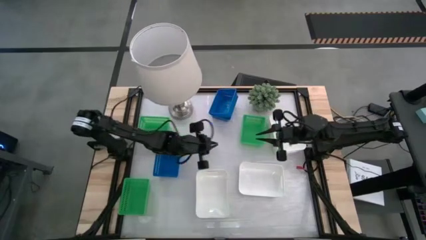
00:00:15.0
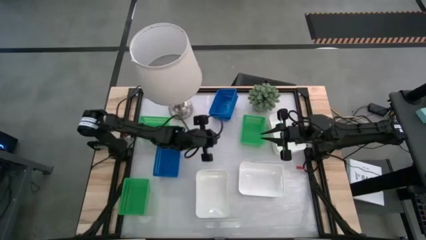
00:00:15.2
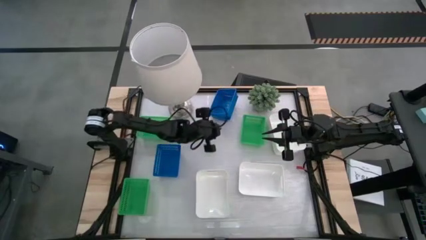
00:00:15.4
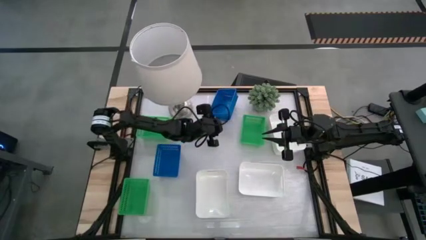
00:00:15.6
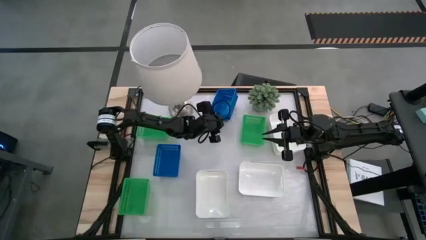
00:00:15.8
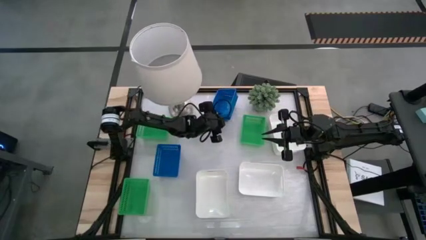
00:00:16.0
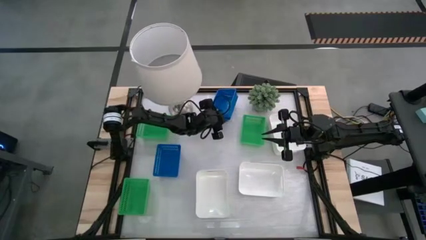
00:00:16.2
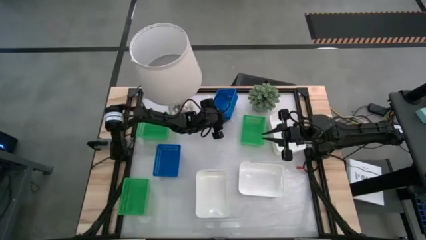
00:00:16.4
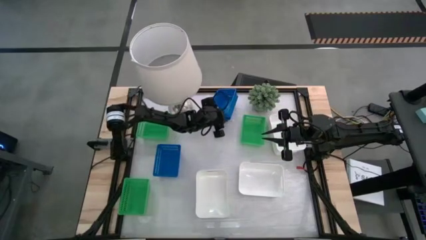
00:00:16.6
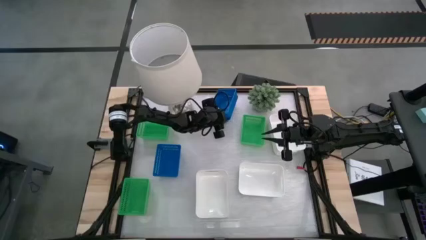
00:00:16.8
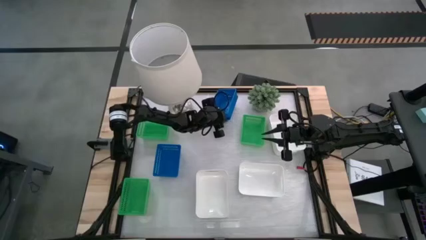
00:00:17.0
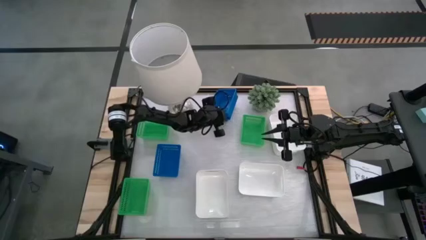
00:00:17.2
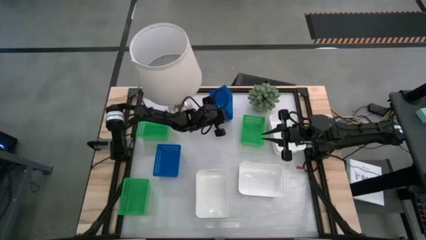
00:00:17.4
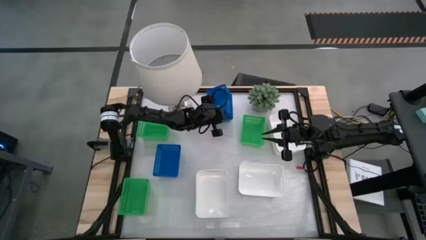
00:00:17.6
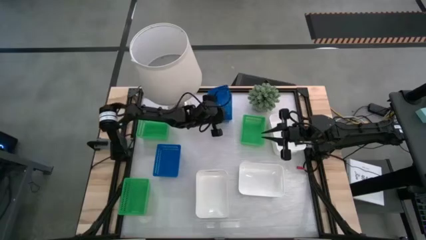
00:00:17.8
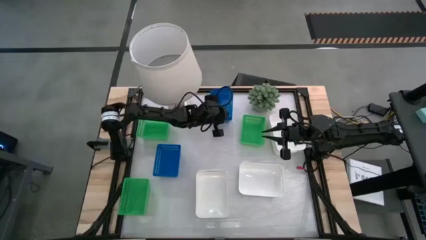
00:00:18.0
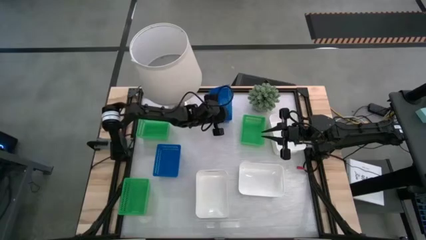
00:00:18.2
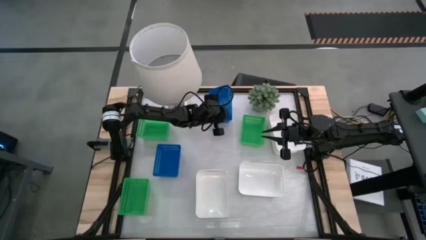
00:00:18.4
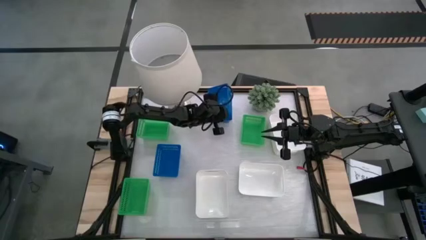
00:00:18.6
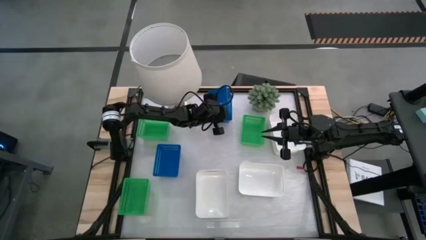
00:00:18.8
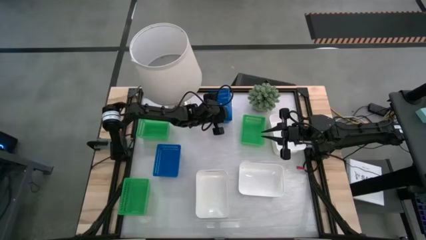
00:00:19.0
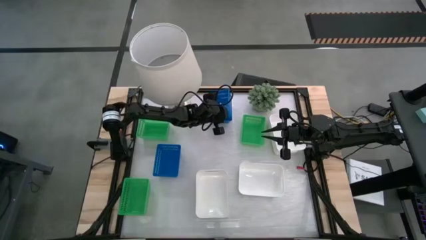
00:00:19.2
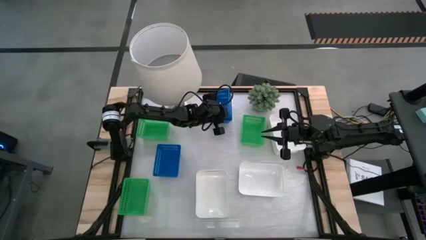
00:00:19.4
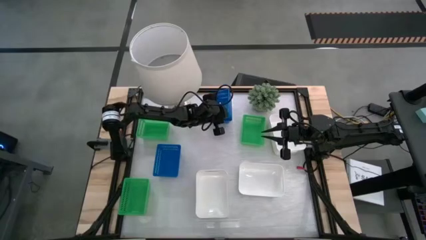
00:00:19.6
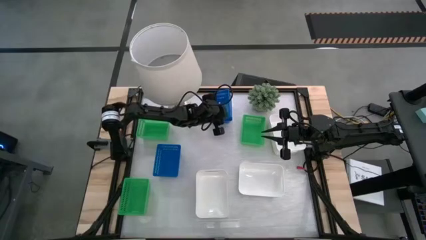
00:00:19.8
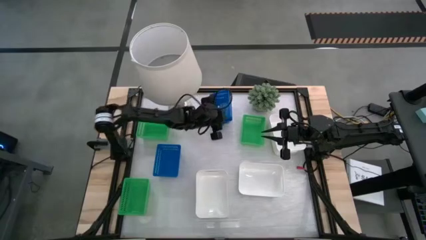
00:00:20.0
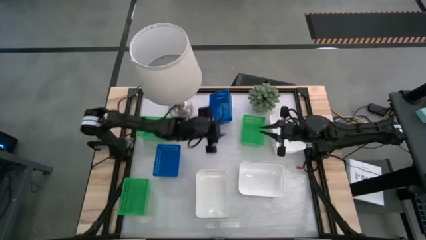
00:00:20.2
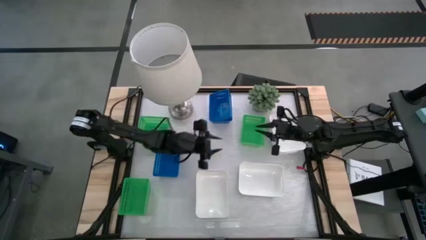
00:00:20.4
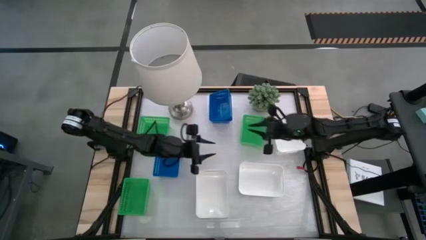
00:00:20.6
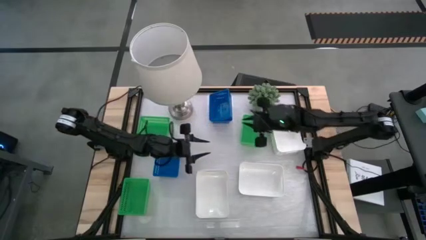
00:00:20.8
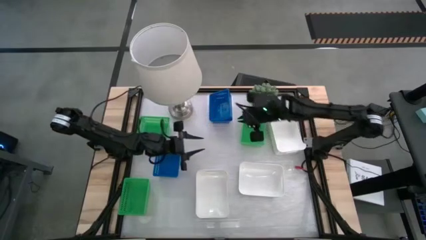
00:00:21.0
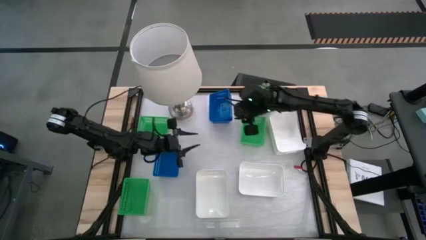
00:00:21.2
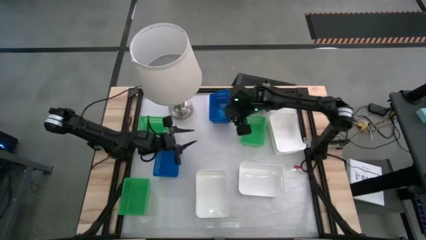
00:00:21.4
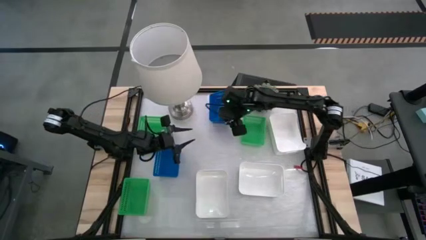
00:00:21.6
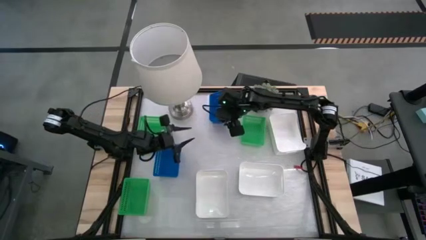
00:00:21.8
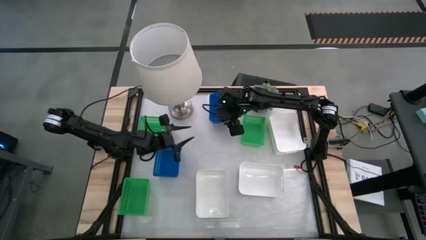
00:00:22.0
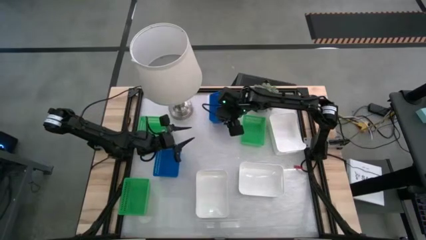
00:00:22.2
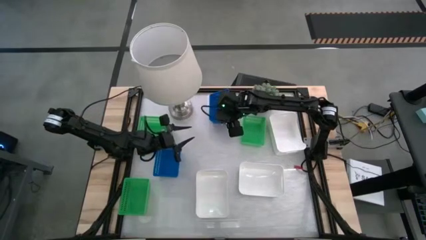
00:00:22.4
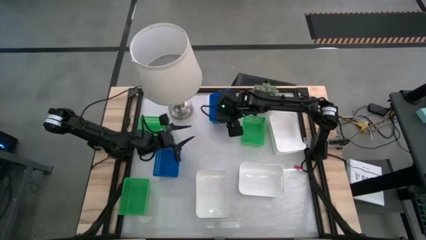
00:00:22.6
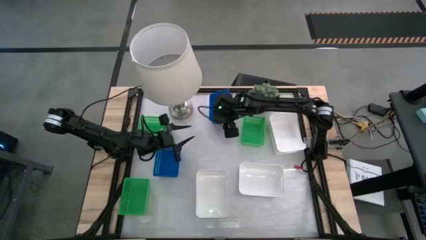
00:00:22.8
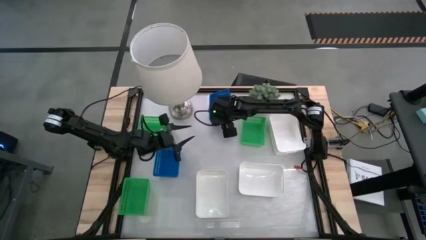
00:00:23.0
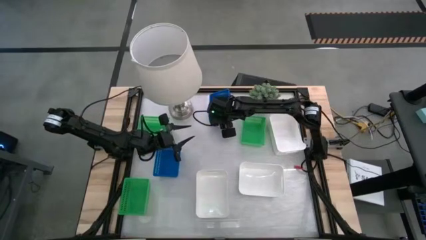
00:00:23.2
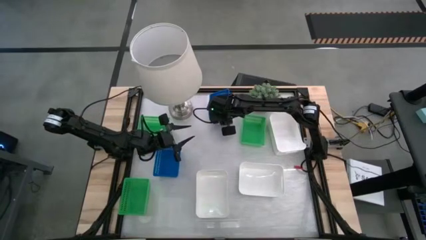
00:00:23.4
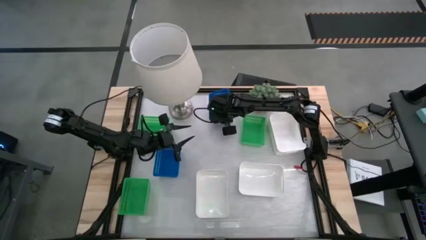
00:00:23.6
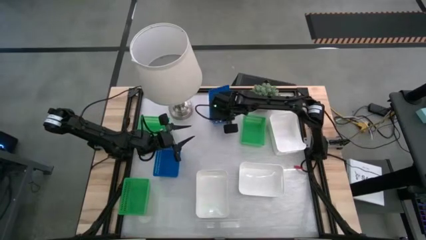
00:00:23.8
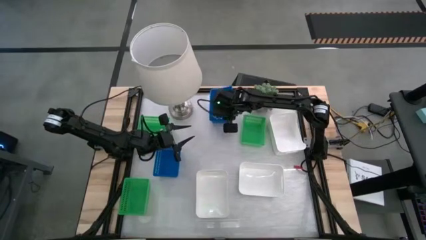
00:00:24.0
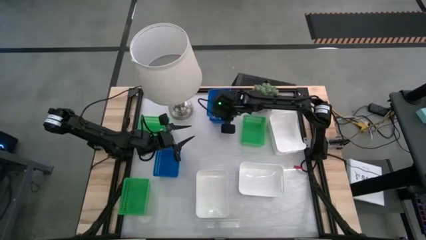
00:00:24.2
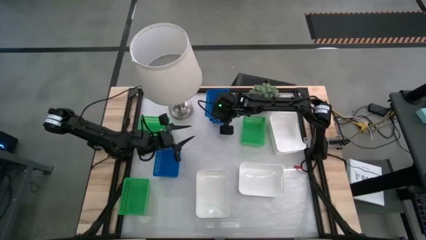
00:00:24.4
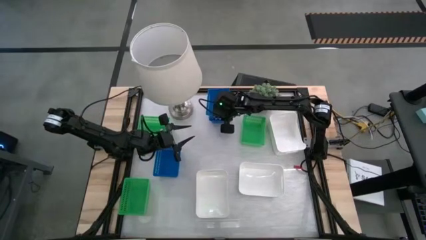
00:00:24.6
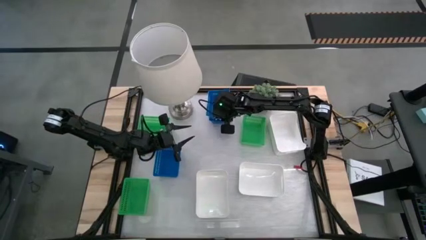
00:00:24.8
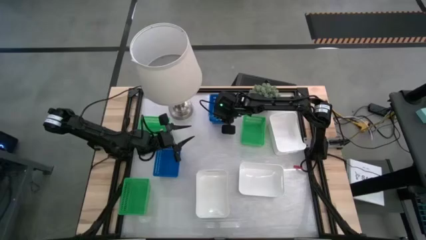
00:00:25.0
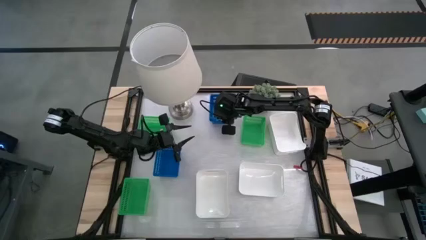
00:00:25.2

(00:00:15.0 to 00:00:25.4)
Stack the middle blue bin on the top blue bin

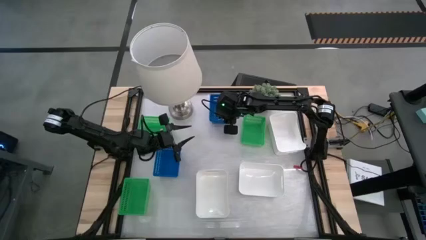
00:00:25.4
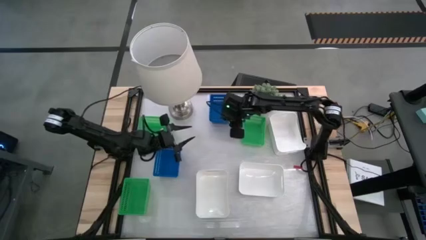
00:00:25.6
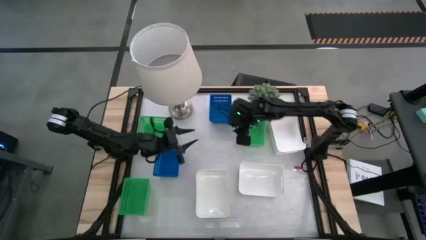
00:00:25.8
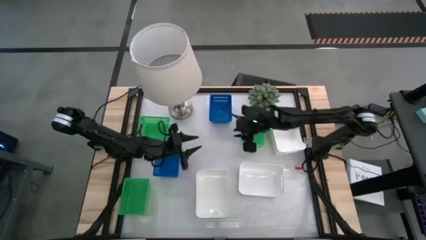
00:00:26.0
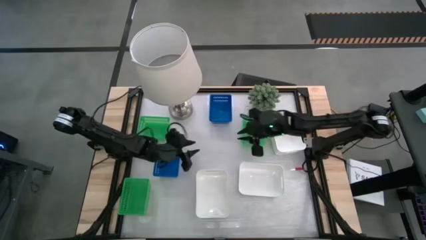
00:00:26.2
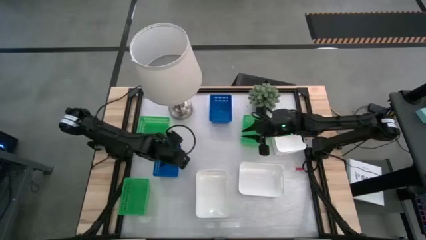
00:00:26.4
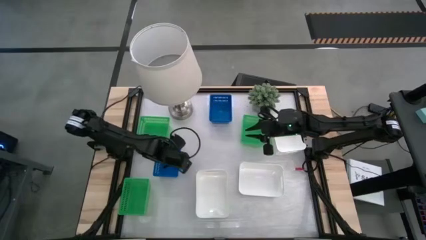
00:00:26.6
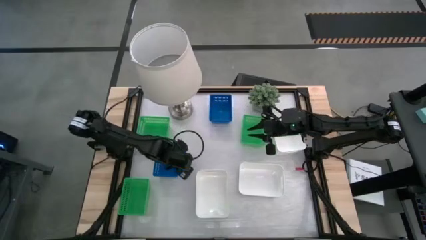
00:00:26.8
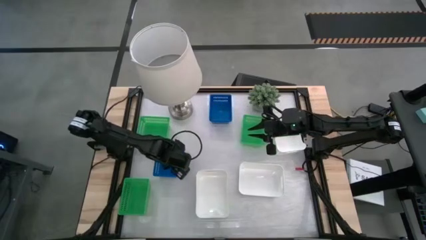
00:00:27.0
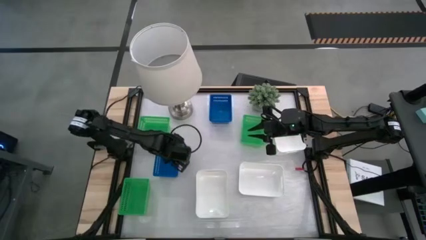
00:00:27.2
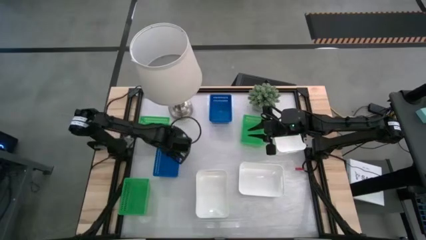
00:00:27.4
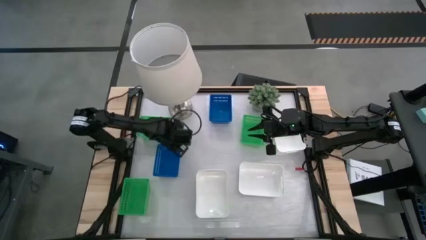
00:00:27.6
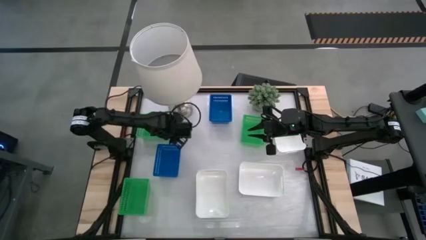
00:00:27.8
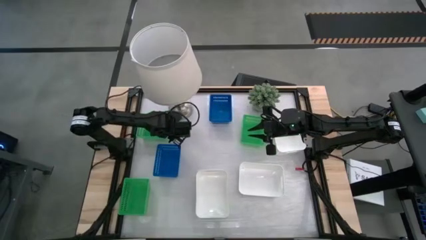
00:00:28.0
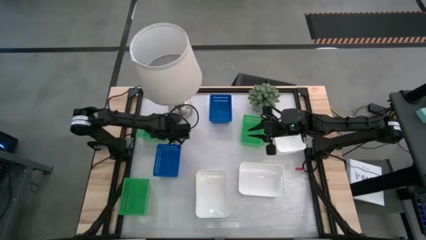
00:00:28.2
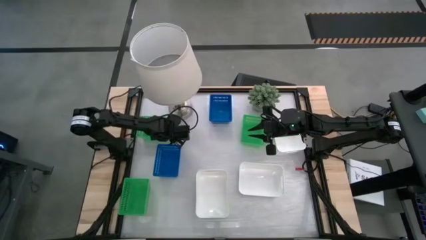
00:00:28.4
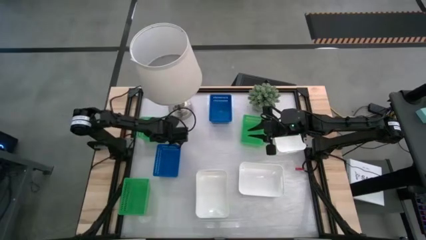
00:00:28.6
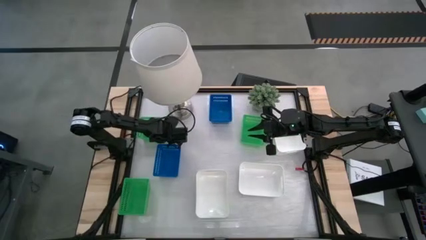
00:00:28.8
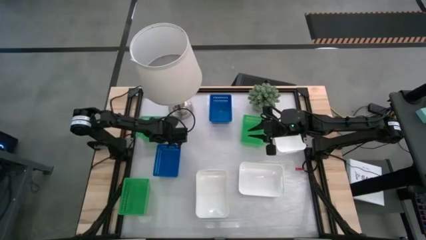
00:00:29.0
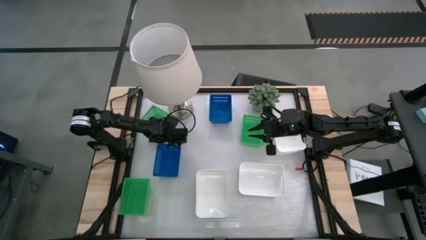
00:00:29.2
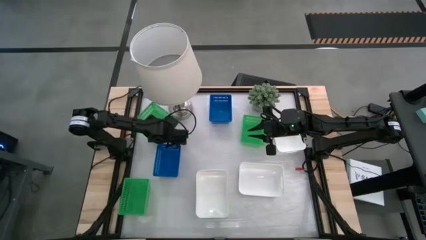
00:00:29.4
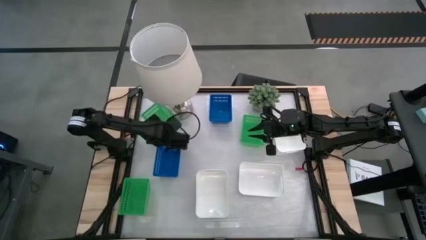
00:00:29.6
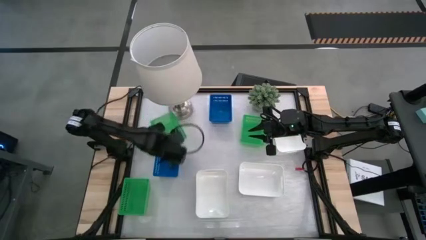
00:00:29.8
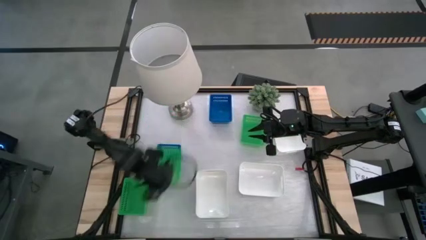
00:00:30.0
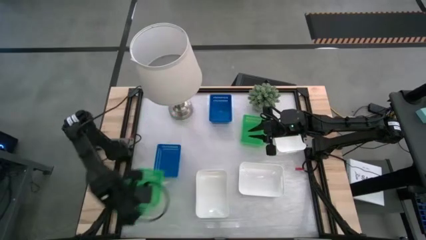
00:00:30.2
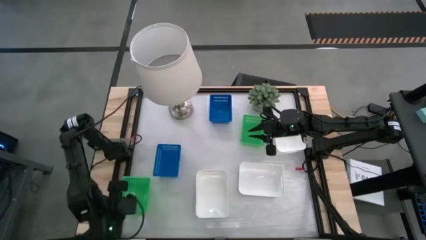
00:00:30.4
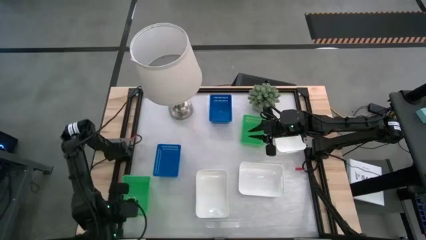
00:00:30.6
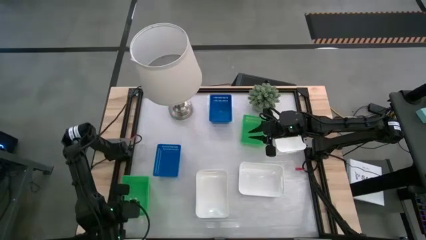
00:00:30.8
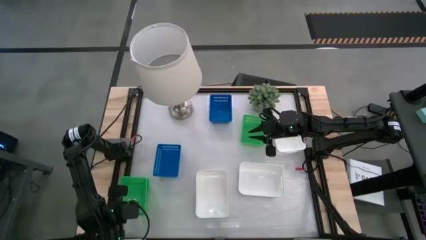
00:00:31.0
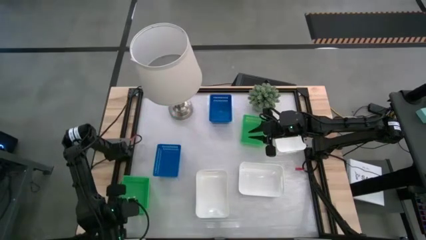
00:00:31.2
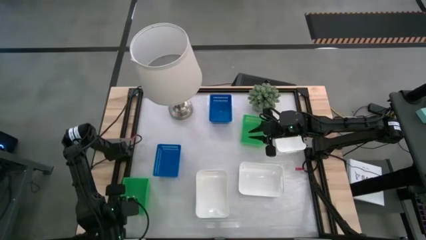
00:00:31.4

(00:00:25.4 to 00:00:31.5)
Stack the top left green bin on the bottom green bin
